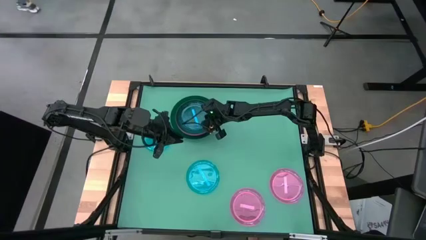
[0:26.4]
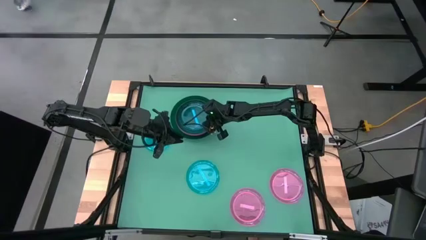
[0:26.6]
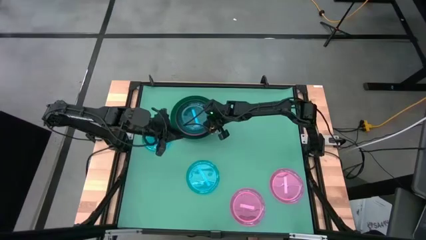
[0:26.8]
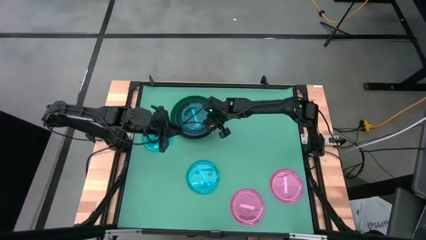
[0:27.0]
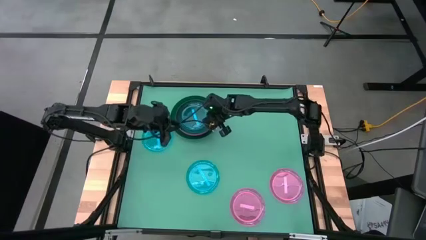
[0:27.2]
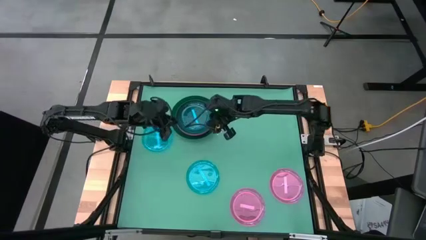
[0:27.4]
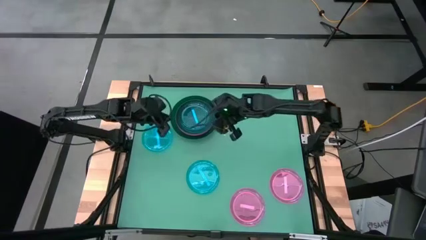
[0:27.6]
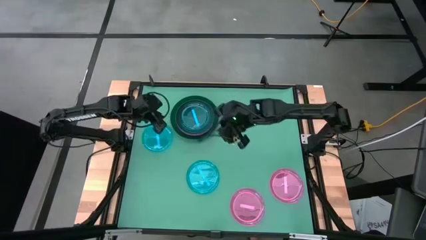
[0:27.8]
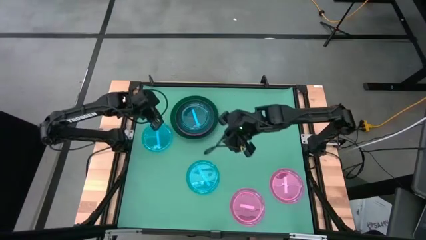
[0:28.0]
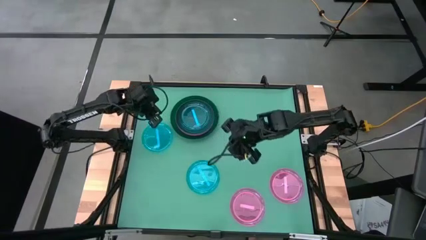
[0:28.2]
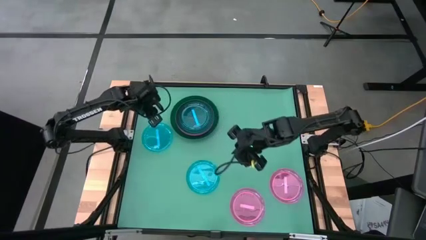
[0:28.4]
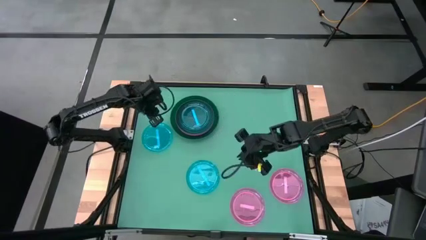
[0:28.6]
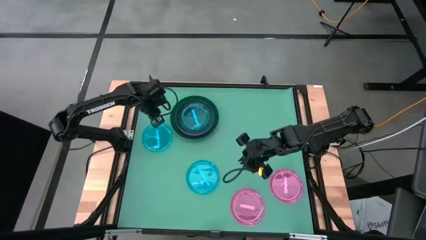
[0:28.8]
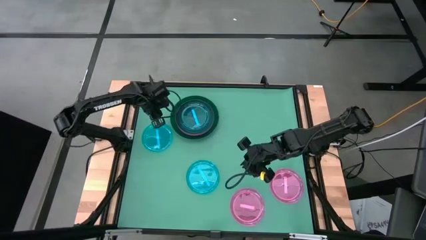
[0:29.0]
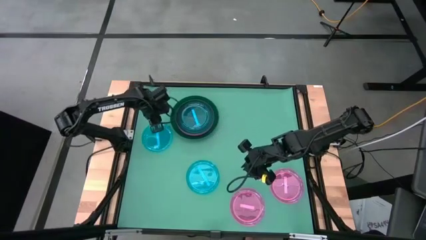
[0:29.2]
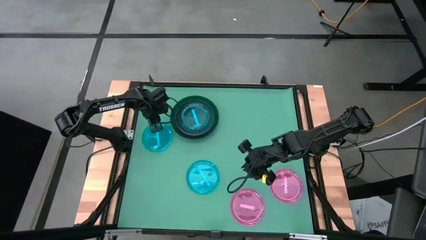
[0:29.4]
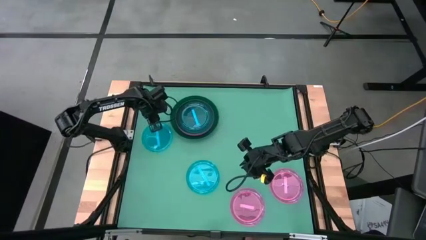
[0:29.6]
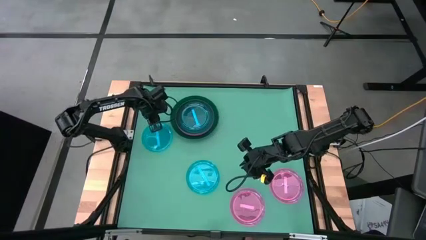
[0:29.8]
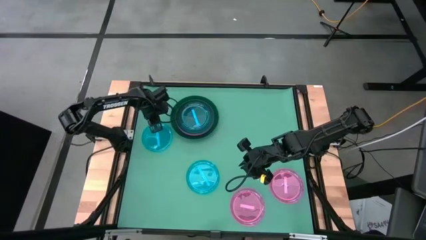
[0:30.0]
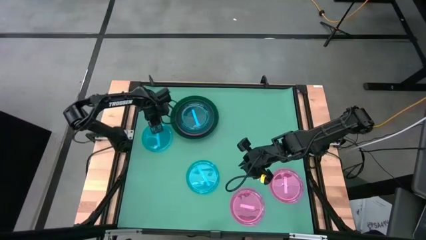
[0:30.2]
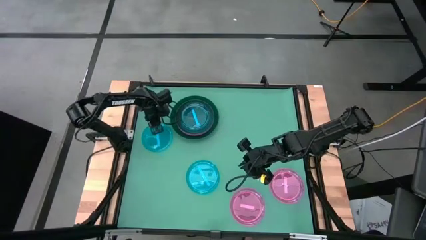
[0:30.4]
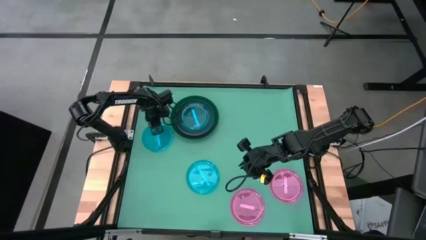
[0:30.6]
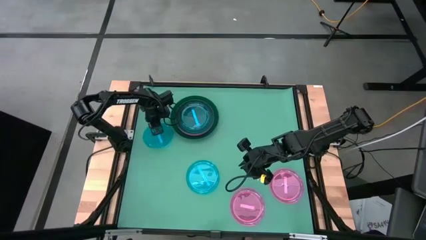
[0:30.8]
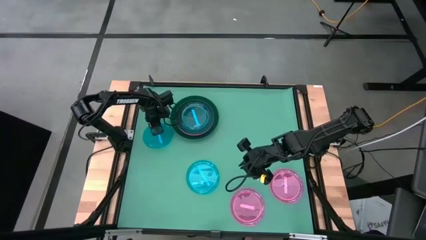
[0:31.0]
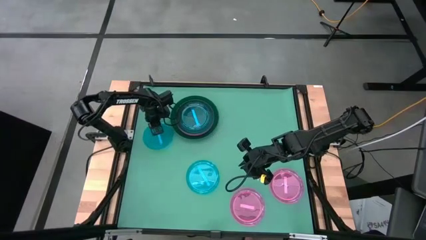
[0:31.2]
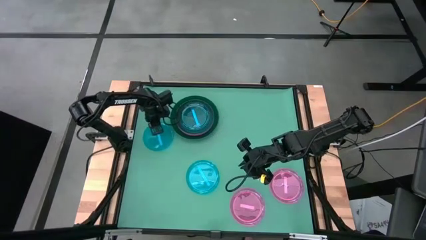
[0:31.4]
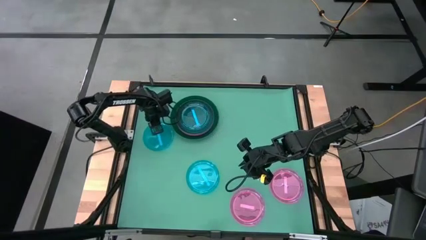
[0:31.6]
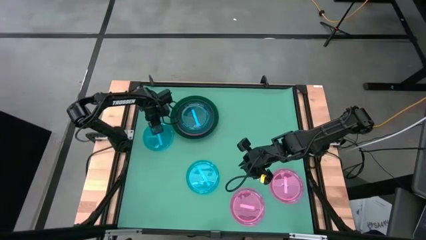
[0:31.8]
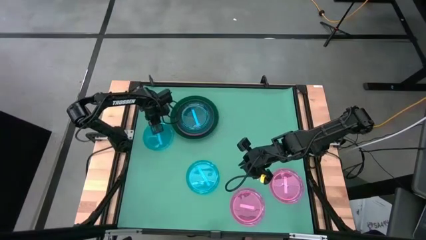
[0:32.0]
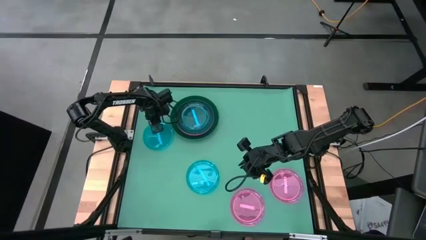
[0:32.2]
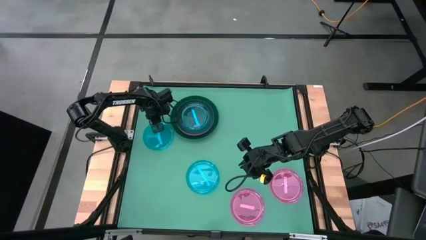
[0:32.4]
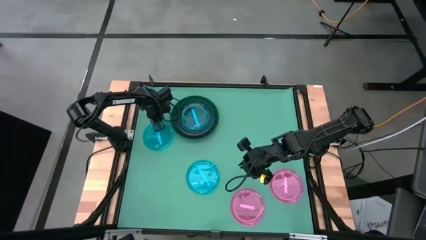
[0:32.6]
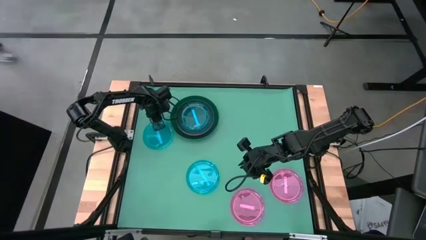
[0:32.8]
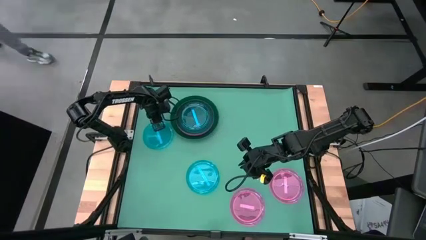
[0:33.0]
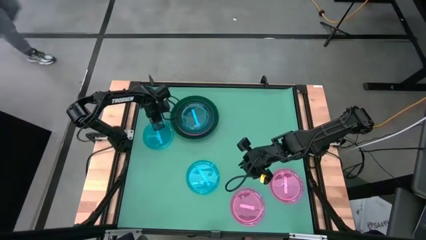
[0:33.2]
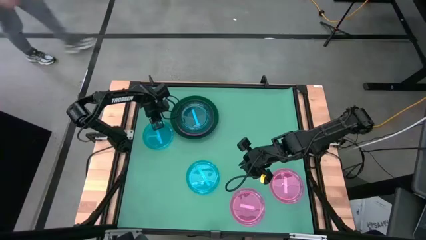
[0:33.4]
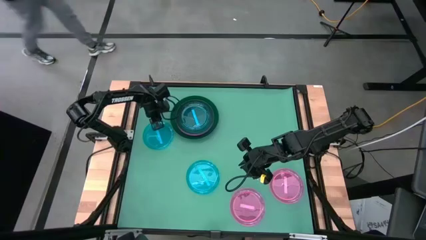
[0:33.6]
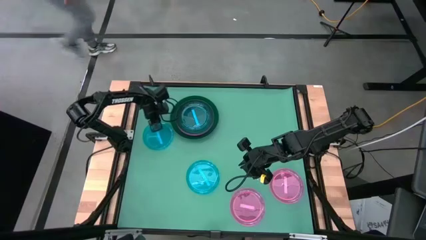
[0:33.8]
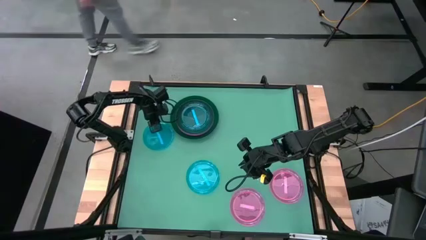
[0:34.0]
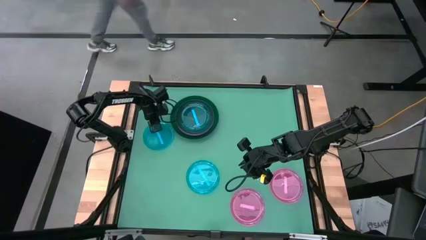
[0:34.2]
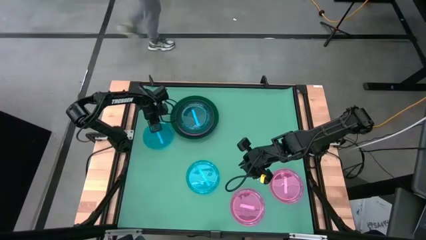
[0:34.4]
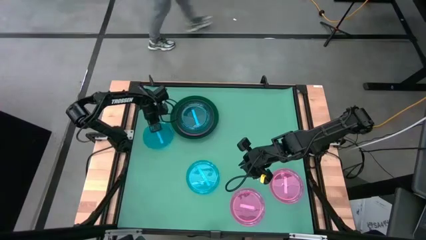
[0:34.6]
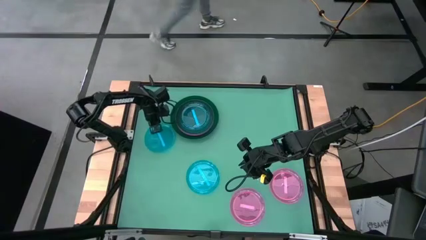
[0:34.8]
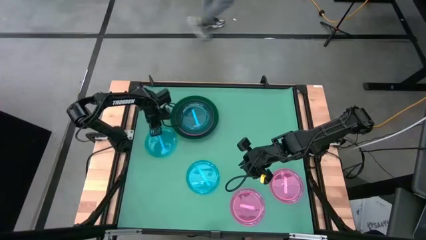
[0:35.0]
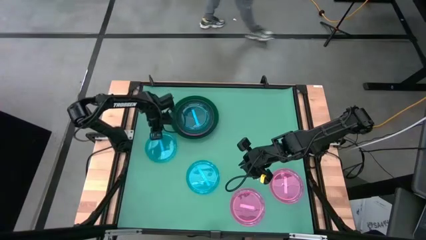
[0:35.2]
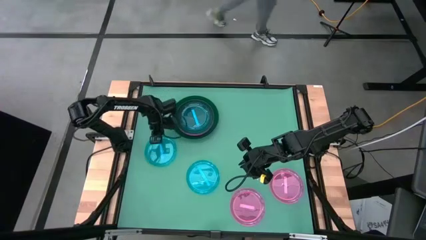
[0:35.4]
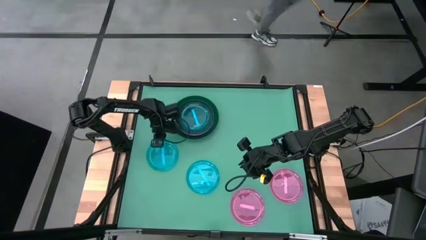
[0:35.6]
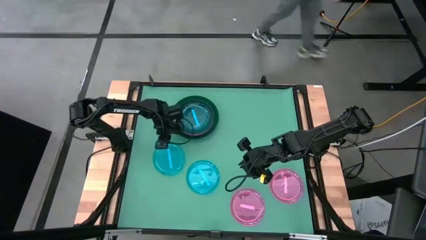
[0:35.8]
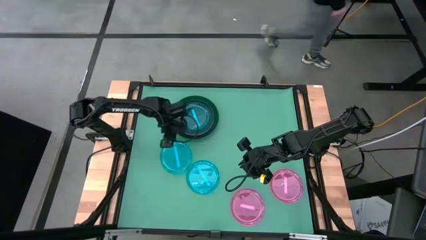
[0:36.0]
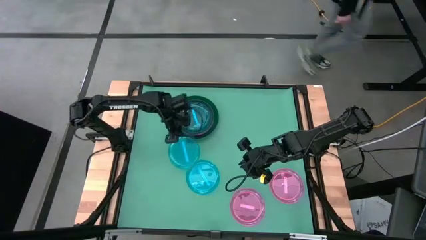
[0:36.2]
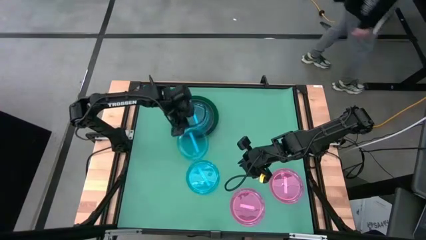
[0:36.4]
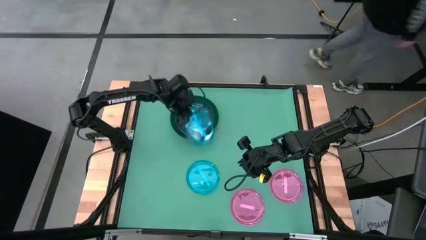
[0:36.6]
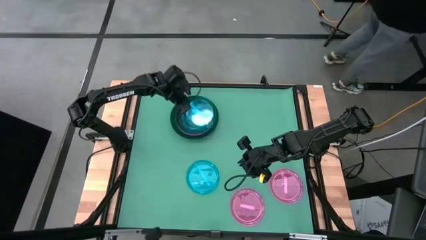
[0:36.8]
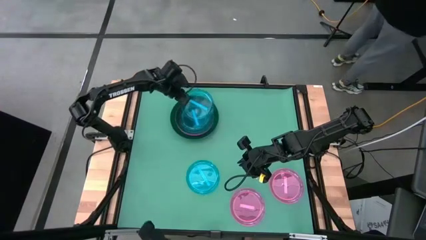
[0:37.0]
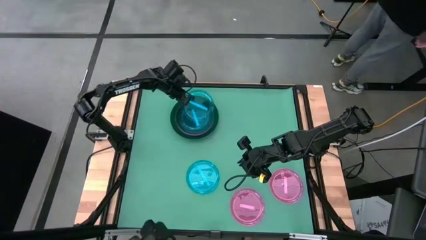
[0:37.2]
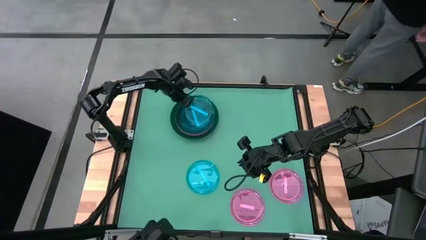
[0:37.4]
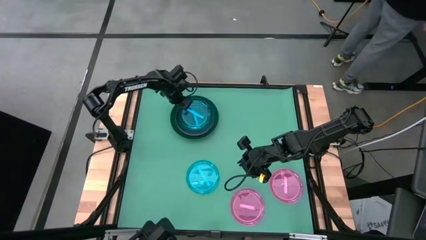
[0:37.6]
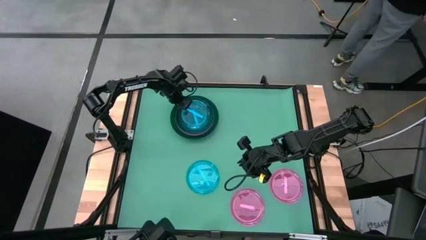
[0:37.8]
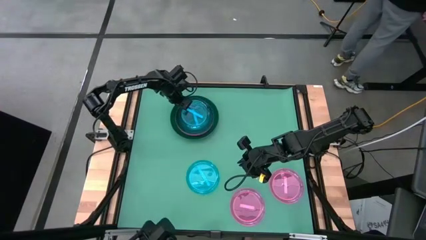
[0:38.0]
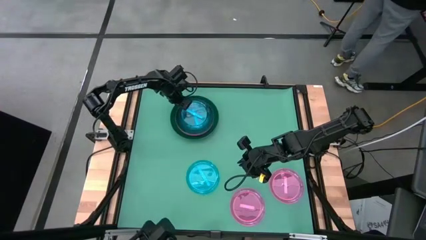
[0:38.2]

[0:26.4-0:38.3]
Task: Stack plastic plates
Stack the top blue plate on top of the blue plate
